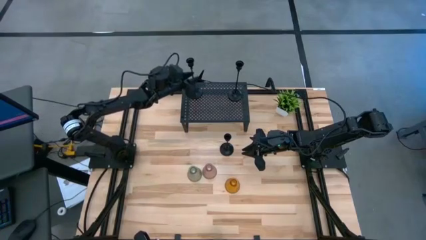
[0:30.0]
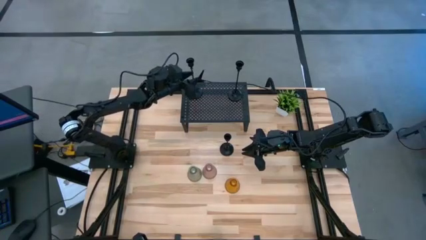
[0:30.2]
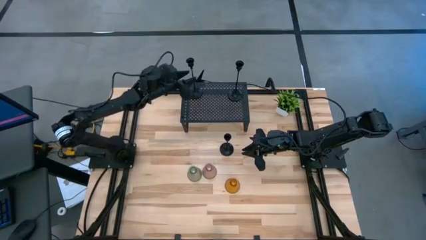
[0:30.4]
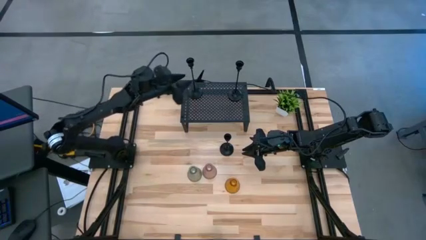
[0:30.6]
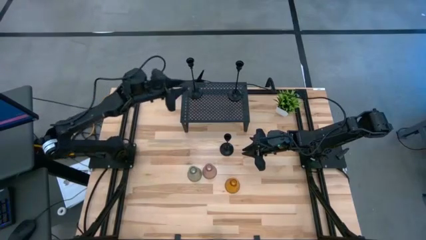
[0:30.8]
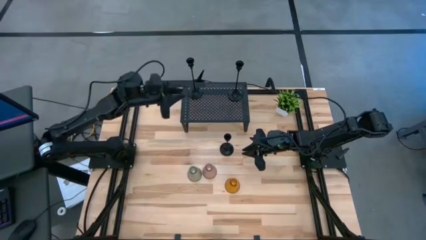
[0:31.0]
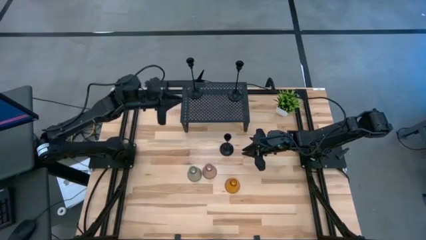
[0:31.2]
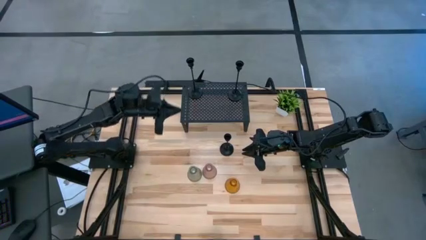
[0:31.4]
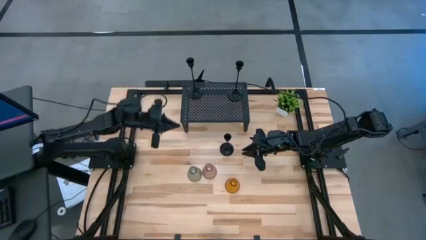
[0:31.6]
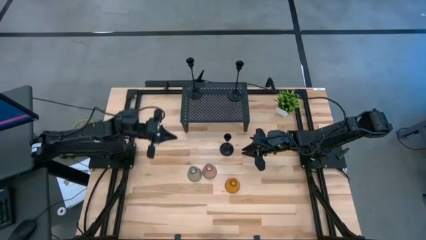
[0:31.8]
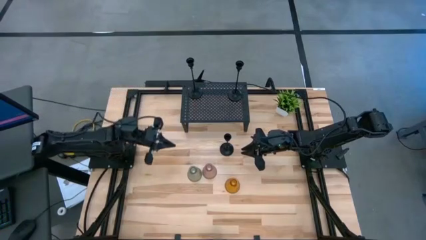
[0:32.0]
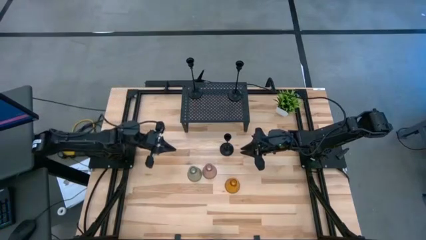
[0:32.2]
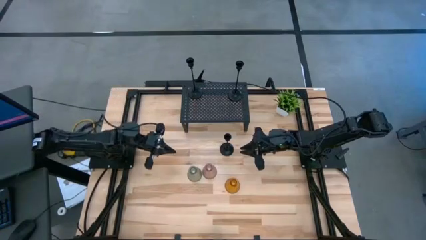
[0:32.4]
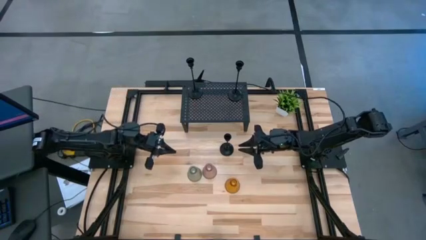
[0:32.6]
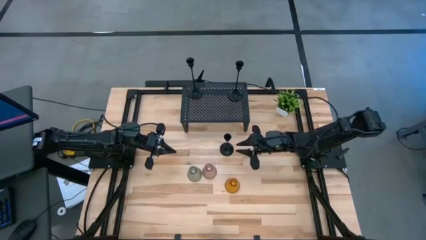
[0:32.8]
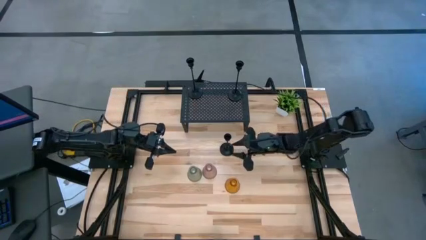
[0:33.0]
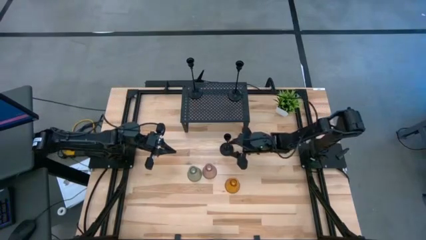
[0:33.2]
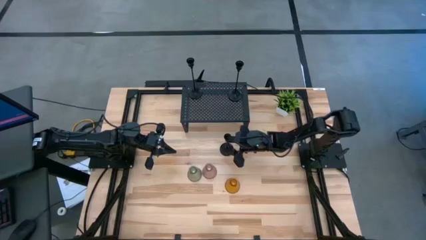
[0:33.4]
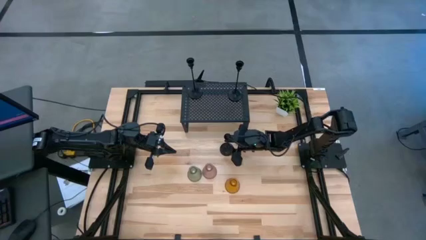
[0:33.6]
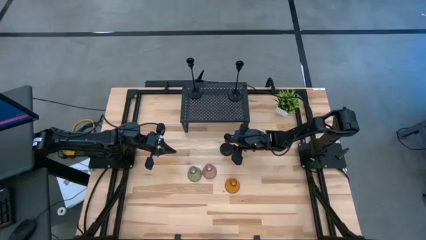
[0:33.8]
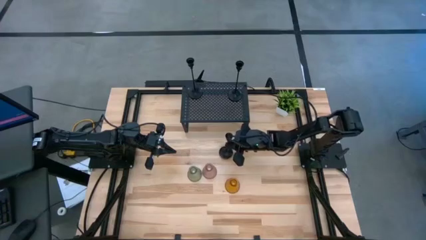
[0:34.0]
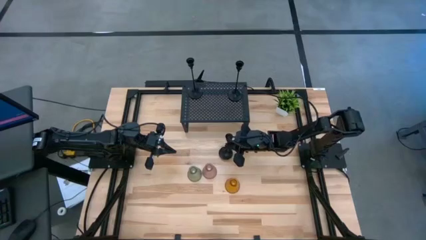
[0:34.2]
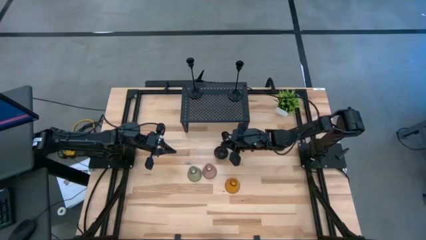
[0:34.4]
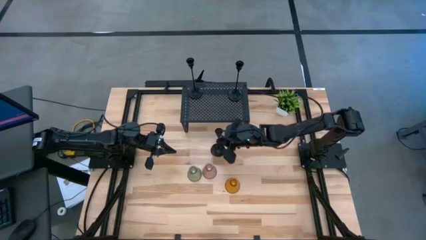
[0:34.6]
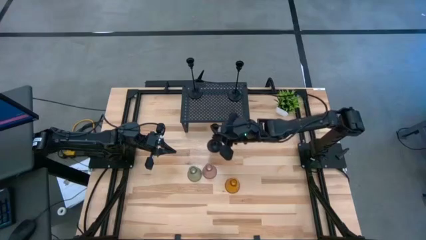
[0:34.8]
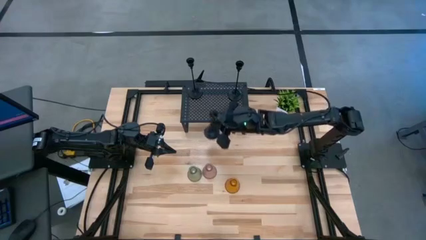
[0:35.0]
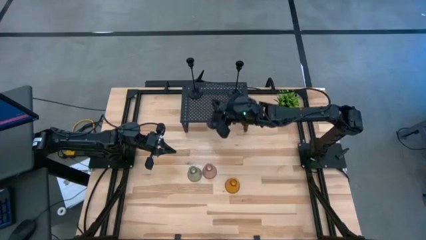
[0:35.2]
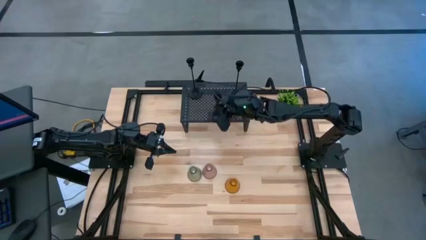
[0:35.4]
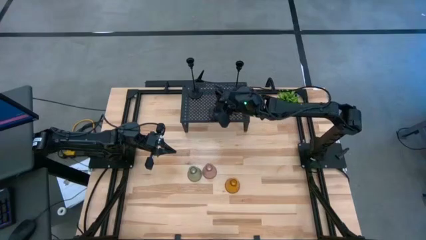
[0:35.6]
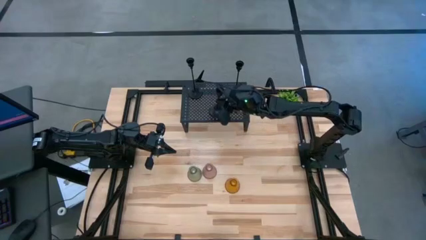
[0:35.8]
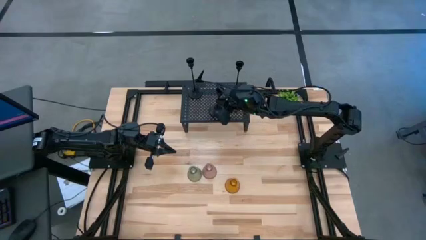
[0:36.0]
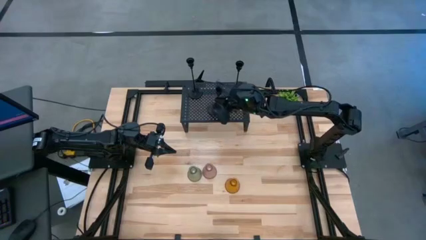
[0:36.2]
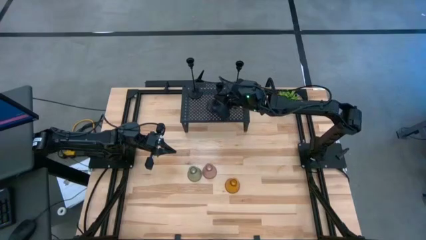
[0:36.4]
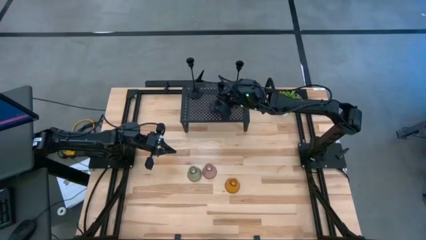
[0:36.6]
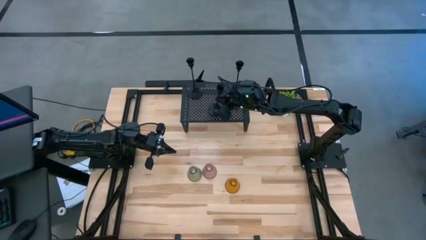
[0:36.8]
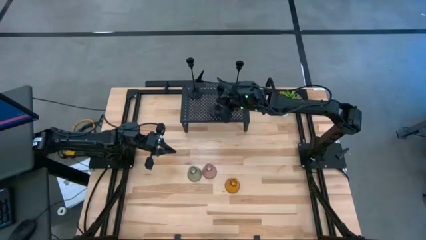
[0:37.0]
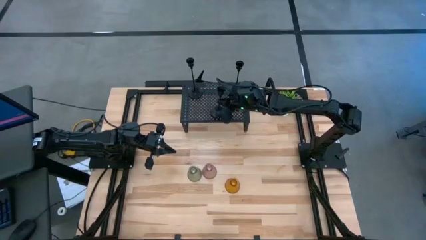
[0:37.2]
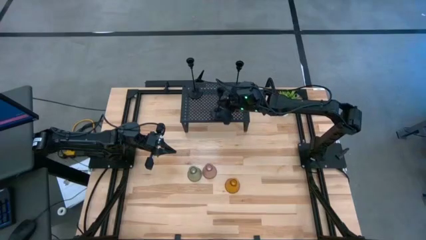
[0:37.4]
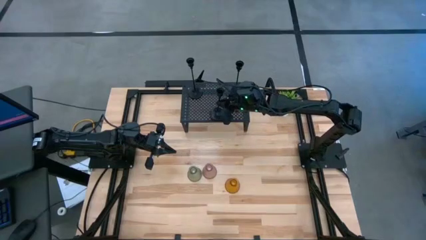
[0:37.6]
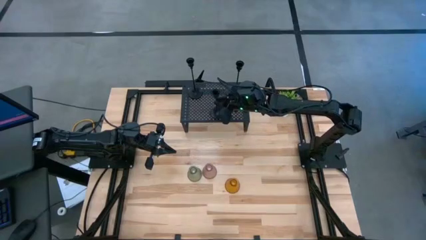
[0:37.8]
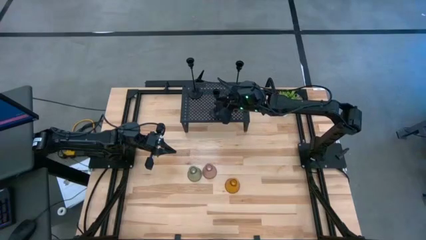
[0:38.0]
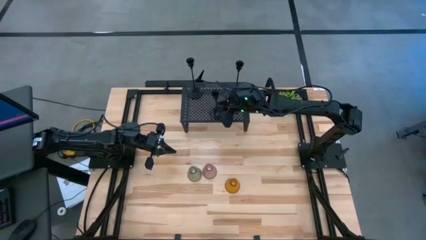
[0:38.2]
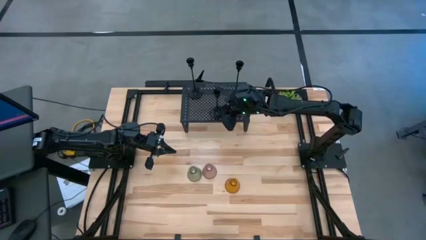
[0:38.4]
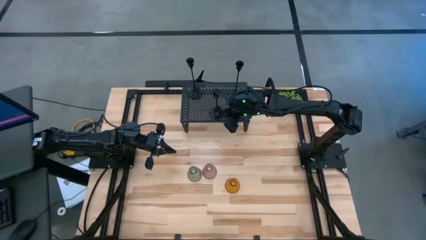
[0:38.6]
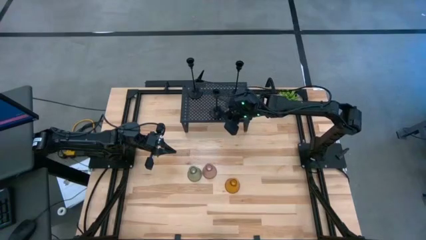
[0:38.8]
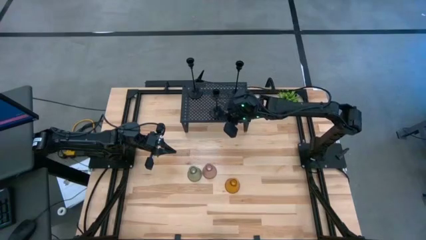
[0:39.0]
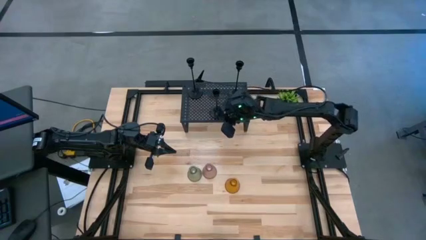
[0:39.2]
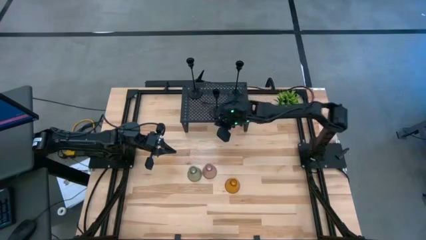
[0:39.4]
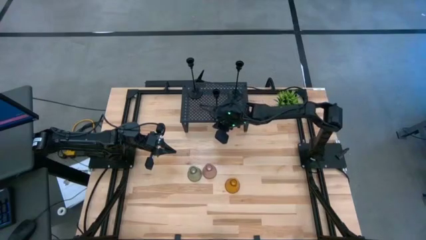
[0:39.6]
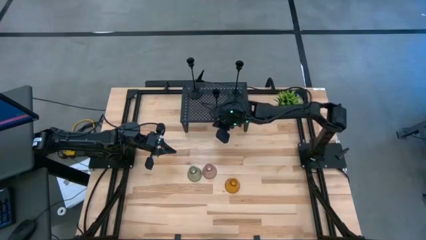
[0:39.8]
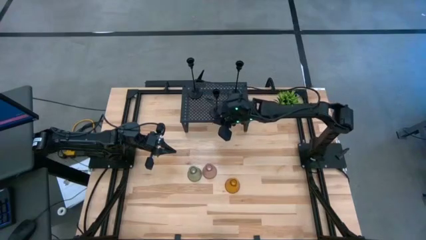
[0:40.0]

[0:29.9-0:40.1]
Task: Pick & Place candle stick holders
Put the black candle holder on the shelf

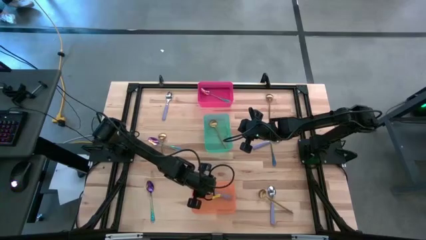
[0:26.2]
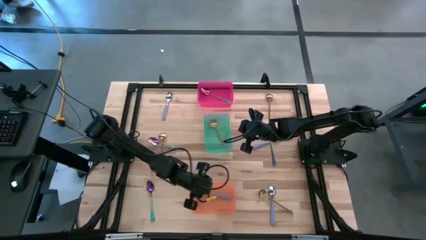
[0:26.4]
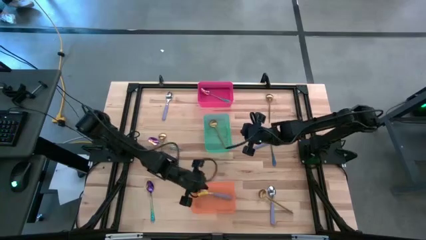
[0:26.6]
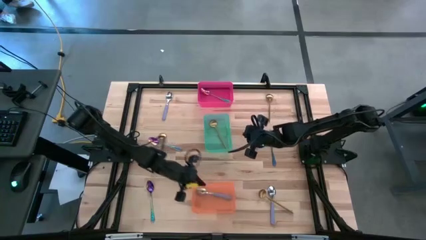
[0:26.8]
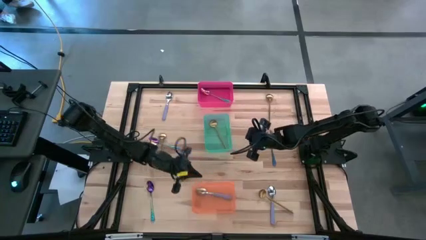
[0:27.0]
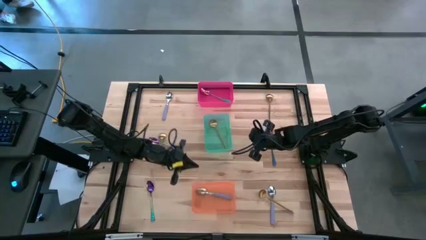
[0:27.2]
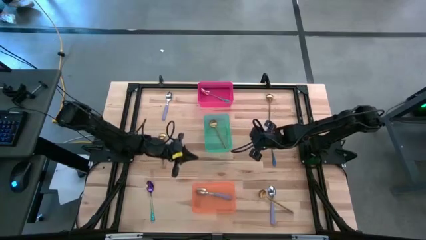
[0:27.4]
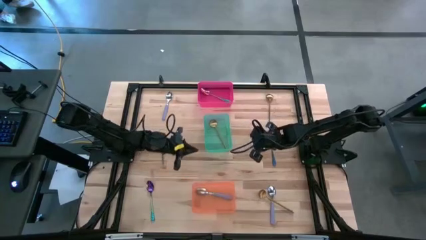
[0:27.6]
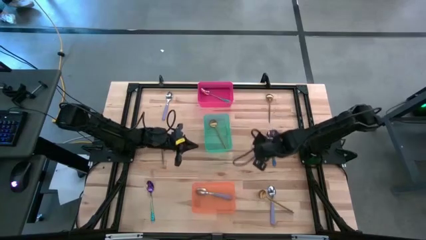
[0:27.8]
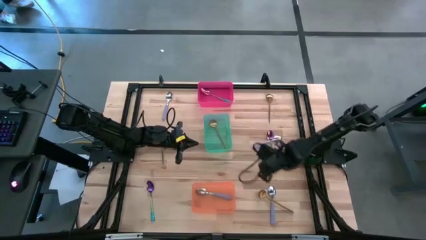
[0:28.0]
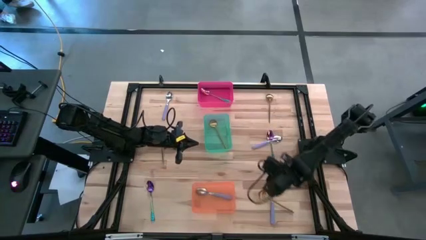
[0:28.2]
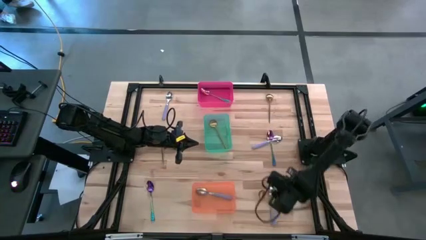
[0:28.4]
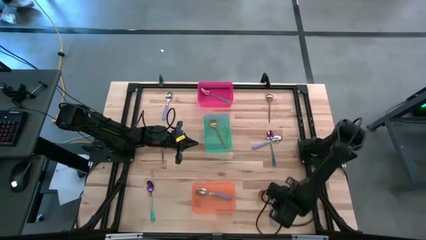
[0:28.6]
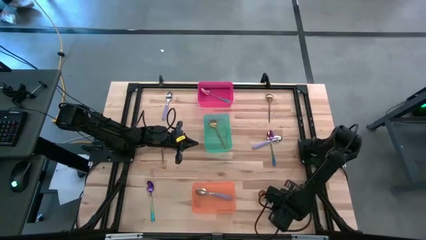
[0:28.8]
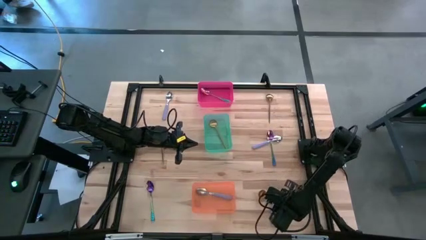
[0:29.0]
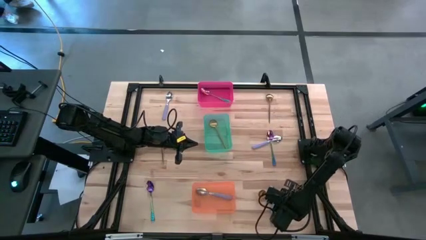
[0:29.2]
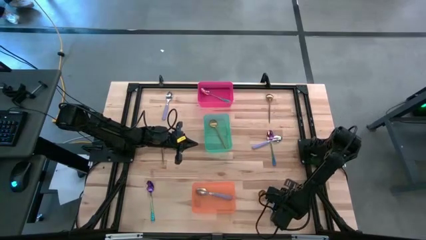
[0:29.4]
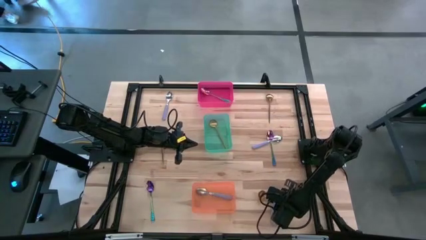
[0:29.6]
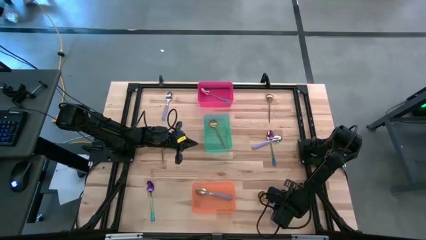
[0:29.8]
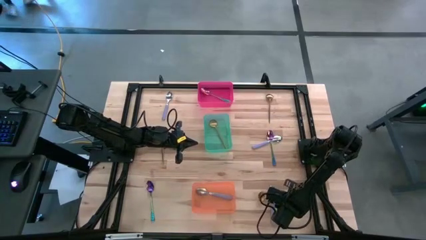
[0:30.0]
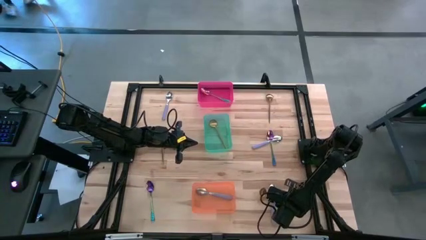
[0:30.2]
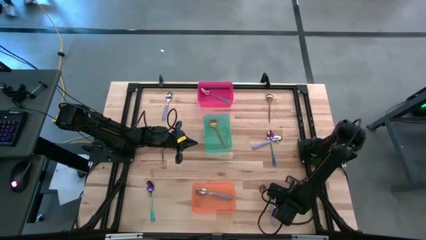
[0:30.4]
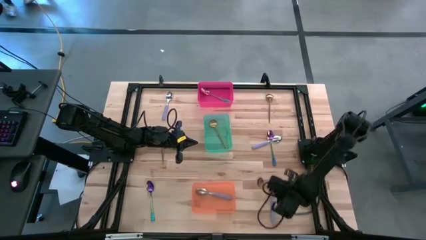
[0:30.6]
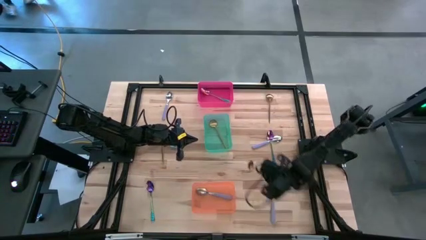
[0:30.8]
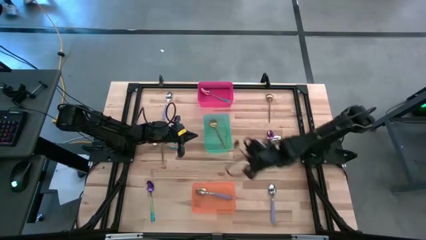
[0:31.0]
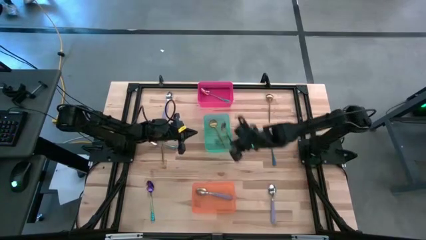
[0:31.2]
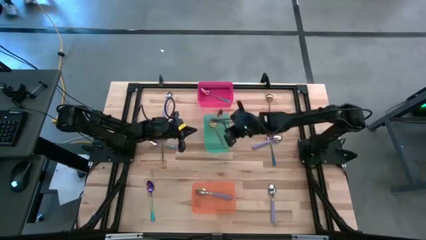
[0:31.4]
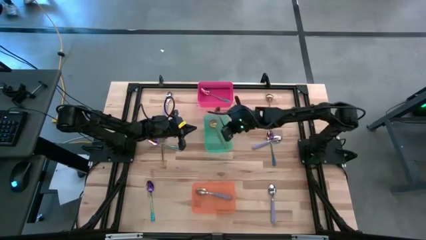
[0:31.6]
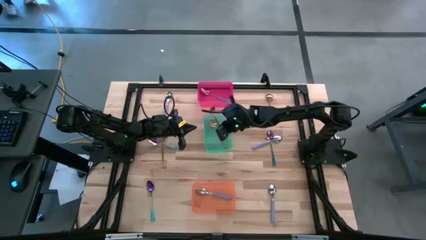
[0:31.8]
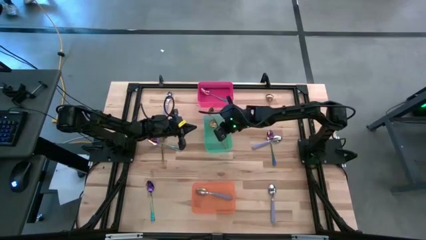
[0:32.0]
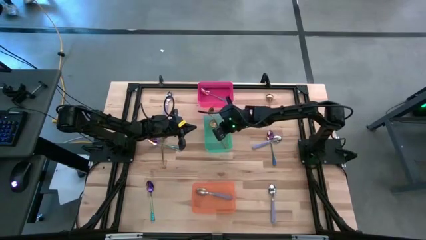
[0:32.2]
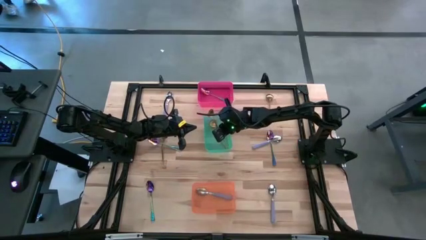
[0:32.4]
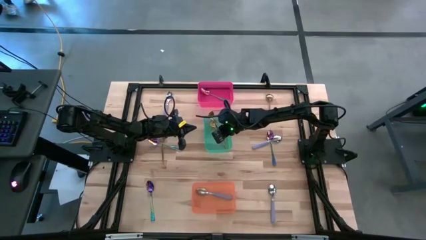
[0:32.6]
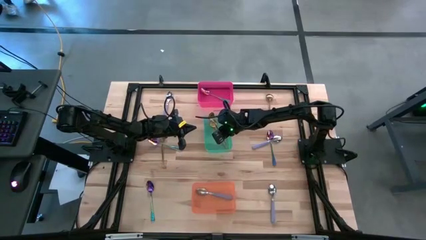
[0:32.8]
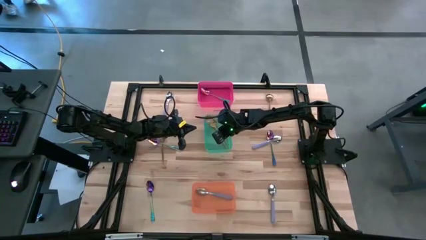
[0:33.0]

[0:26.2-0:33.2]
Task: Sort silverware by color (type)
Put the gold spoon in the blue bin
